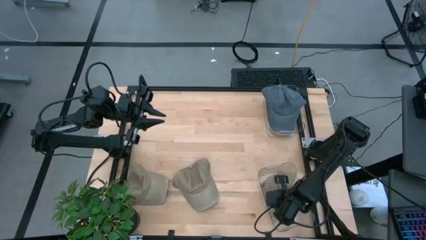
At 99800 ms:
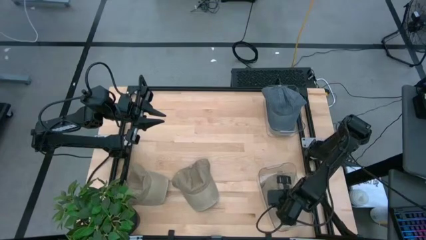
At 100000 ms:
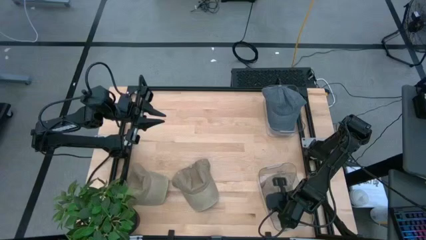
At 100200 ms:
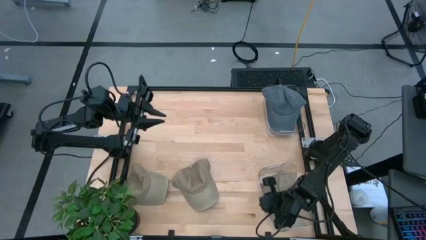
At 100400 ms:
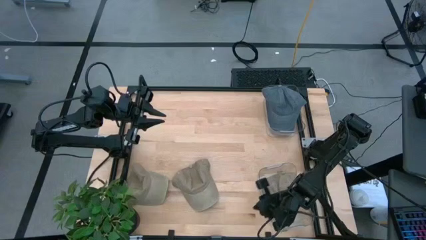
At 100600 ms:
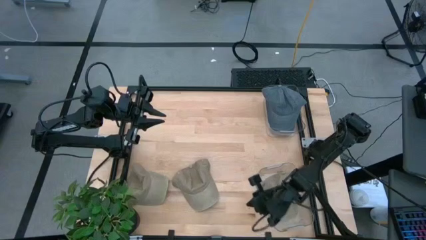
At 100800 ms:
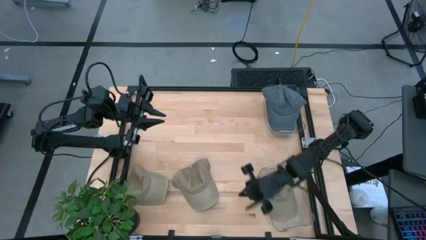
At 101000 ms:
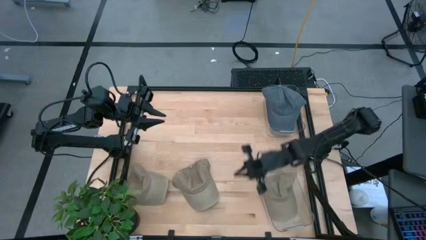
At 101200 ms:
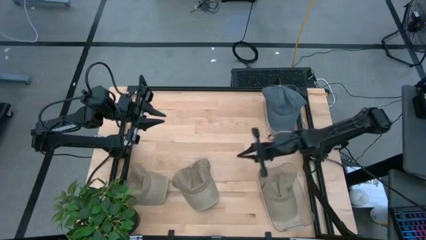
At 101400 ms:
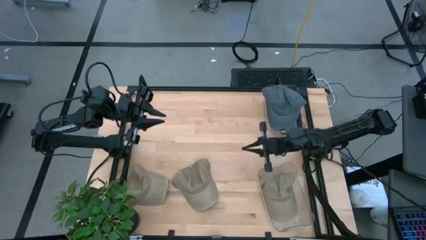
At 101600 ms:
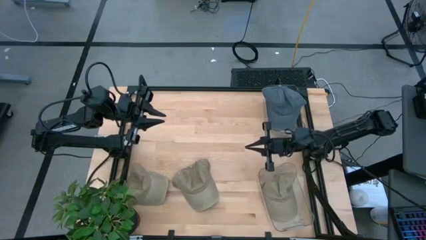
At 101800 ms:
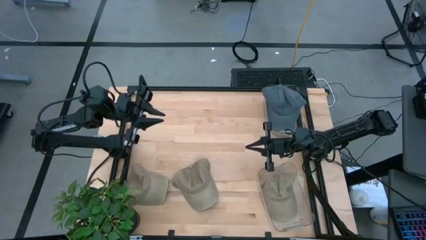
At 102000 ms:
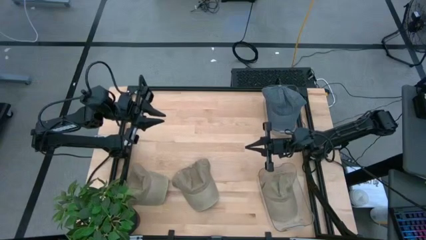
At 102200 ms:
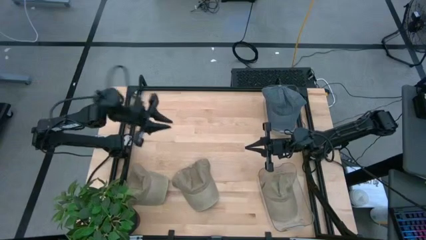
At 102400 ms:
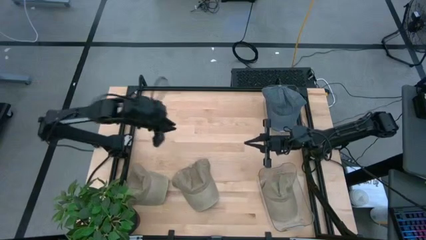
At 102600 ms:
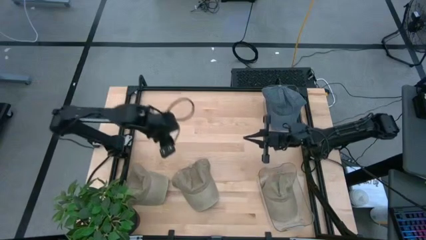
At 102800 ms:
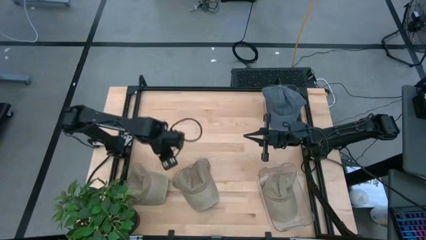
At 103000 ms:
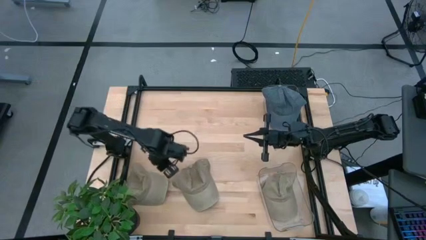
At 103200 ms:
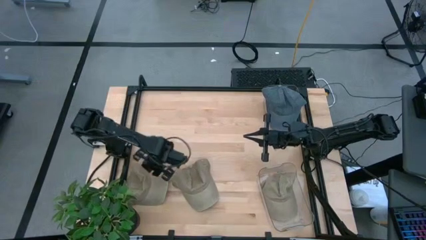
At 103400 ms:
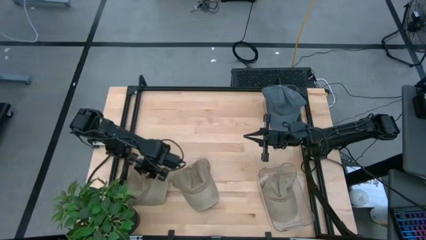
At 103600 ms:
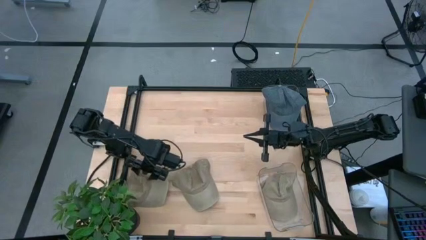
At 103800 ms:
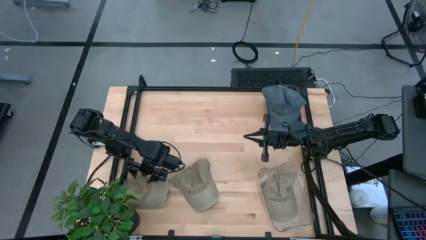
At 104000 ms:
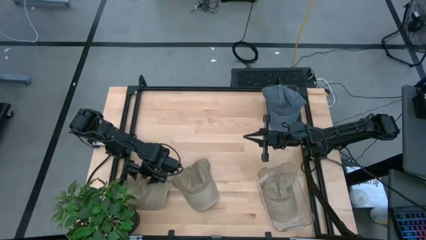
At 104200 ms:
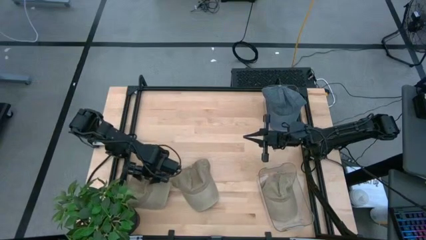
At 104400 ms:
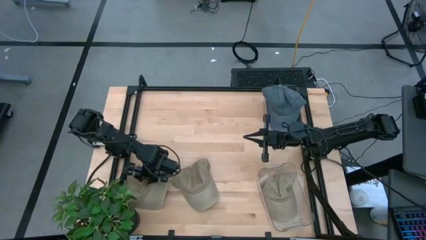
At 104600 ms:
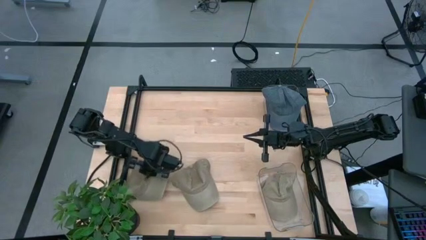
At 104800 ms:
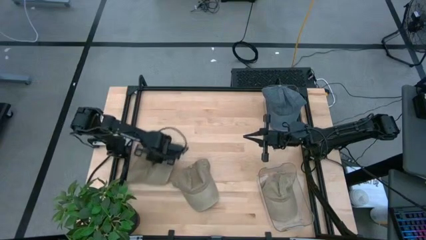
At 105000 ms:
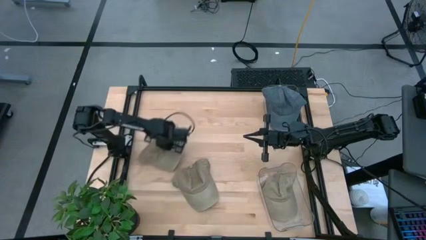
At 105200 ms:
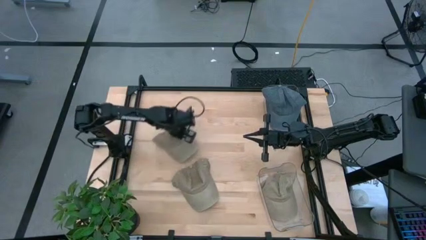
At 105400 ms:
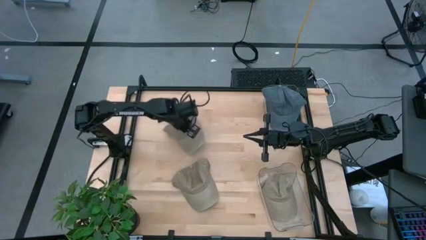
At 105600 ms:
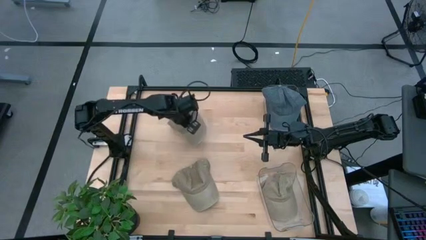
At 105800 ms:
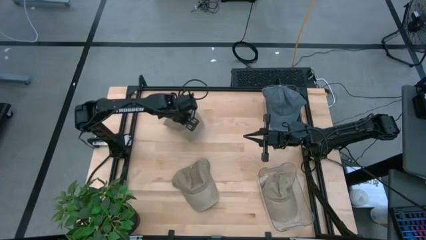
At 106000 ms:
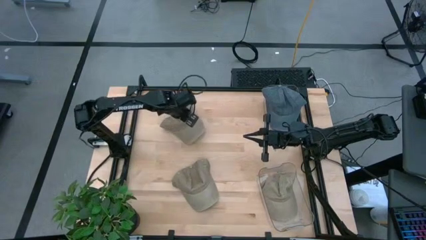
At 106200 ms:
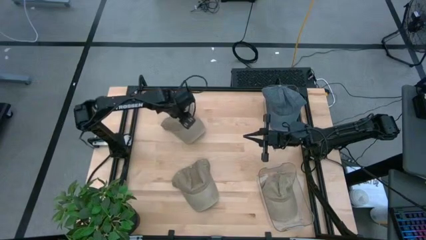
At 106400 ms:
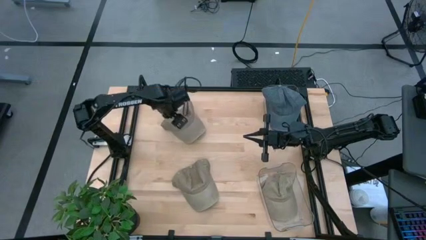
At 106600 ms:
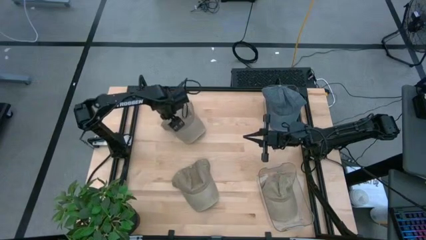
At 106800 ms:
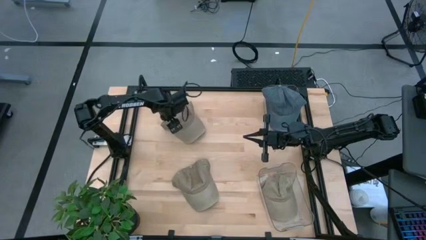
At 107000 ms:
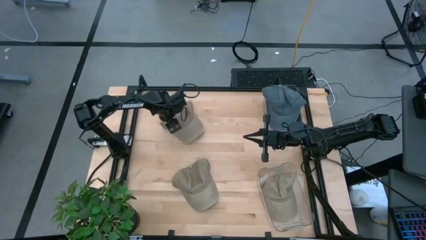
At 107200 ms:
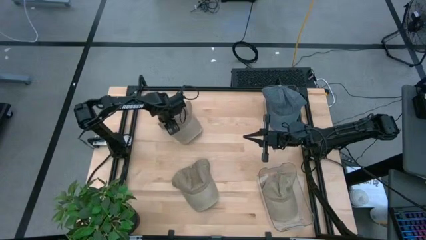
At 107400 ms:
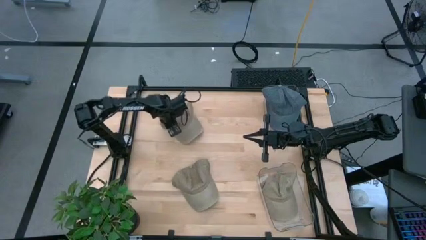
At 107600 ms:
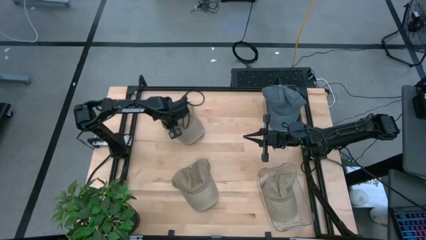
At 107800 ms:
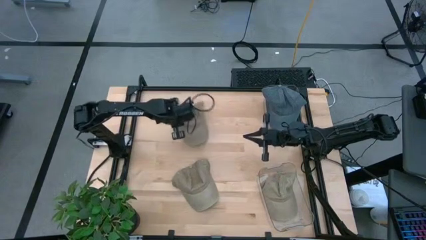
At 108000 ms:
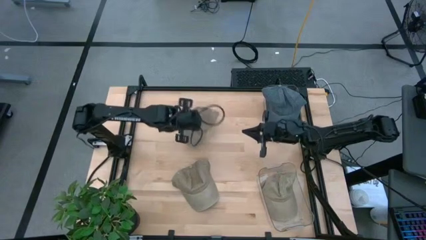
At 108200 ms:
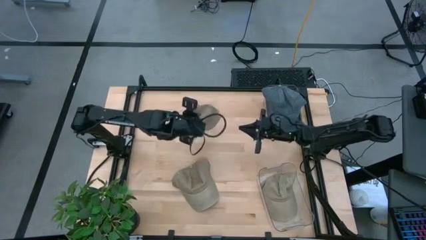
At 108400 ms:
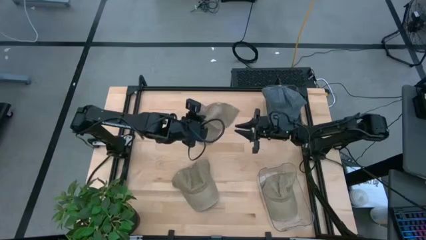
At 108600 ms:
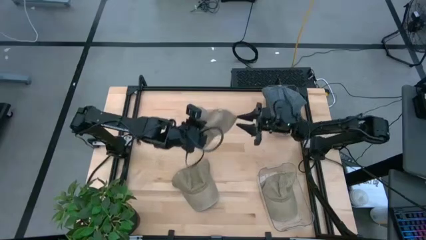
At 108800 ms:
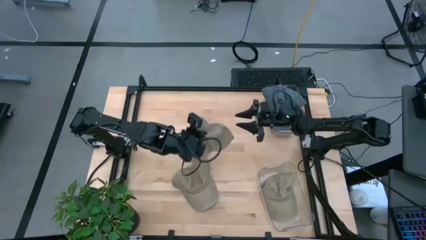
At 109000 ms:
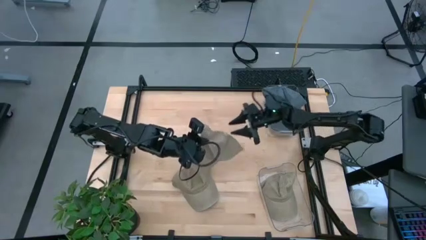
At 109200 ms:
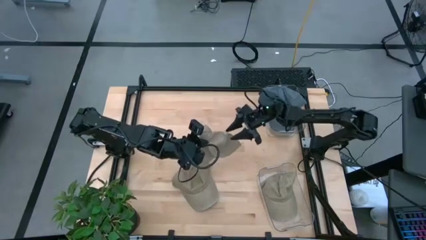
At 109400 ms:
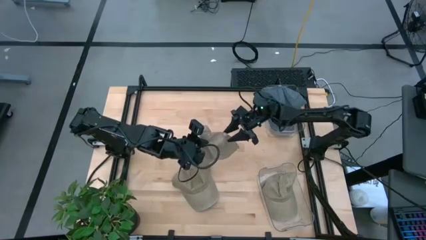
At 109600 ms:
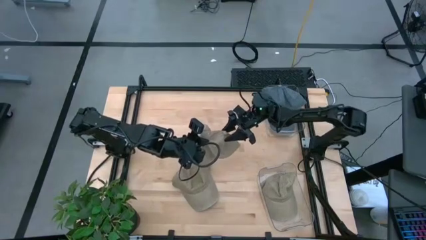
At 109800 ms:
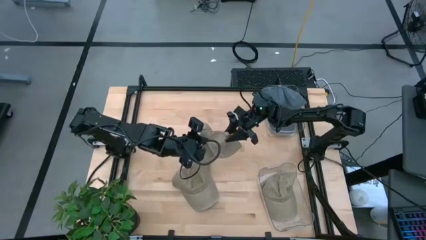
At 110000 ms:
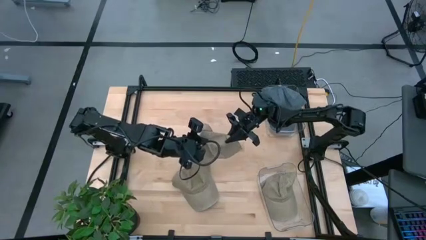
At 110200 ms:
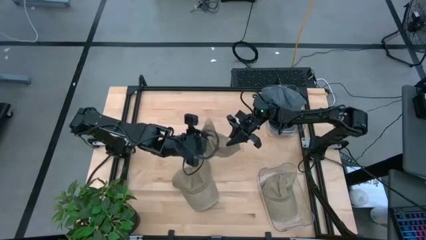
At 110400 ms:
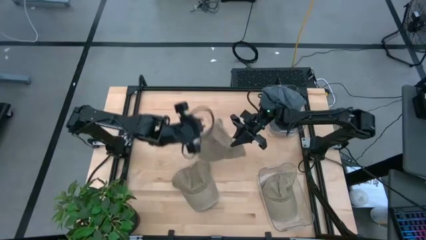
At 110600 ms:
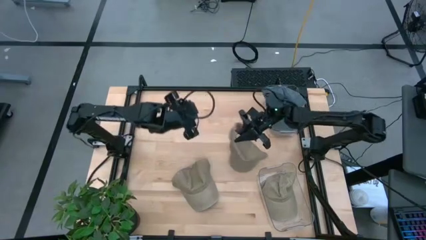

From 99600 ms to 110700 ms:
Task: Pick & Place hat
Put the left brown and blue cap into the bottom transparent bin

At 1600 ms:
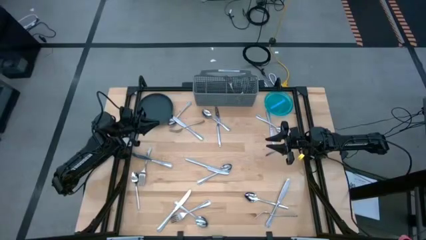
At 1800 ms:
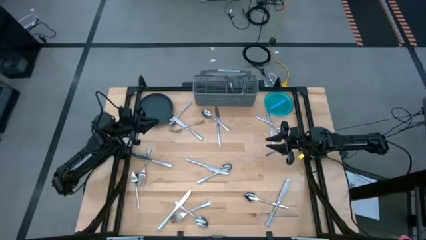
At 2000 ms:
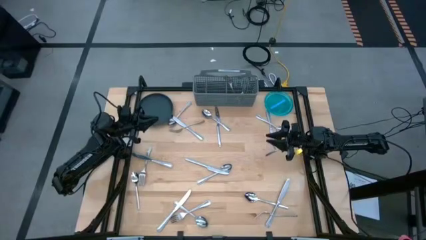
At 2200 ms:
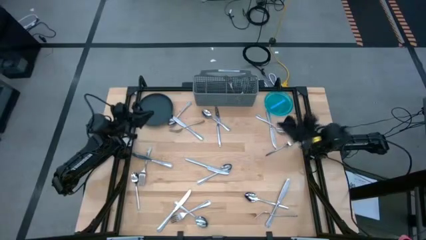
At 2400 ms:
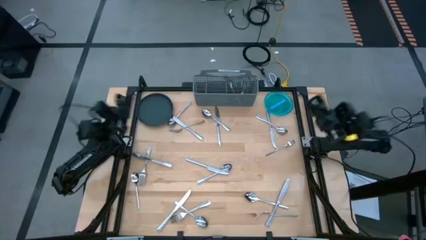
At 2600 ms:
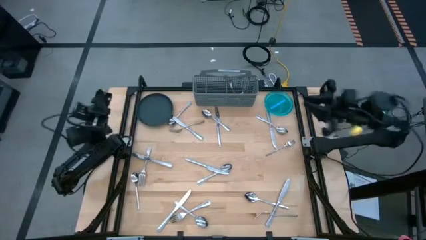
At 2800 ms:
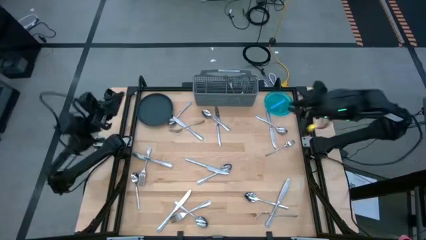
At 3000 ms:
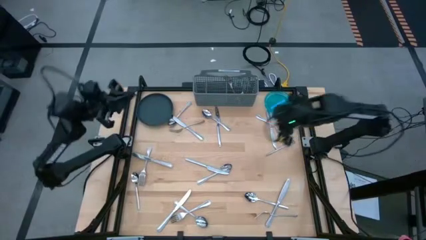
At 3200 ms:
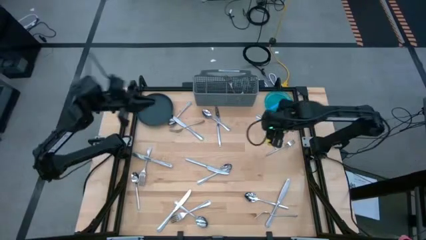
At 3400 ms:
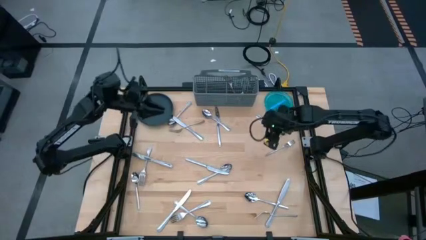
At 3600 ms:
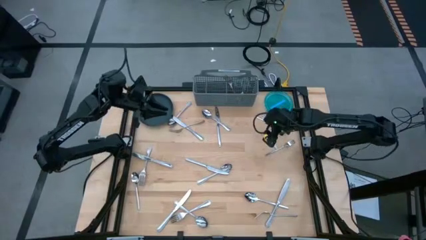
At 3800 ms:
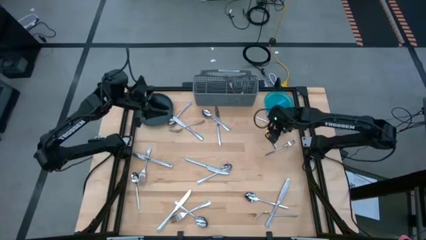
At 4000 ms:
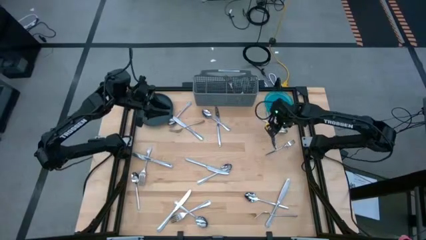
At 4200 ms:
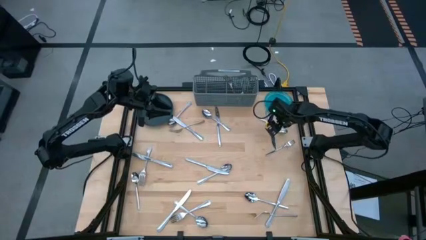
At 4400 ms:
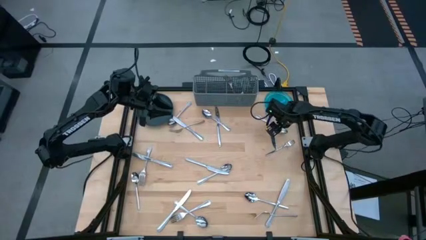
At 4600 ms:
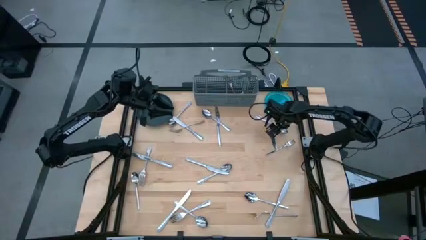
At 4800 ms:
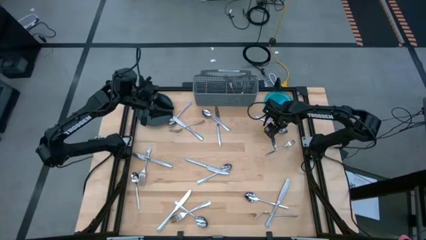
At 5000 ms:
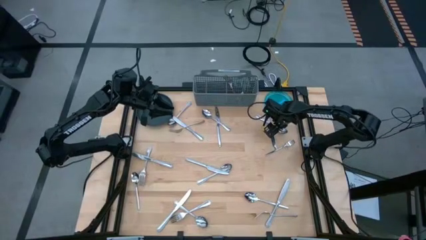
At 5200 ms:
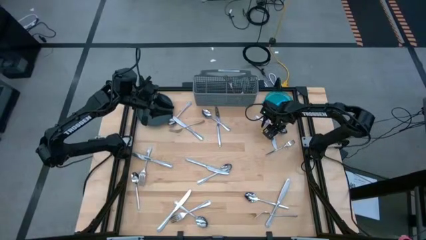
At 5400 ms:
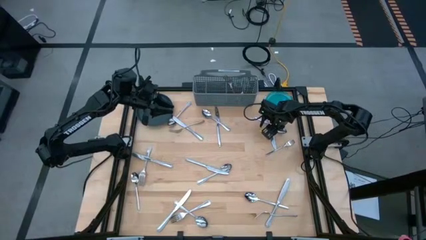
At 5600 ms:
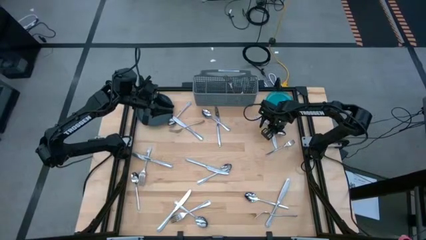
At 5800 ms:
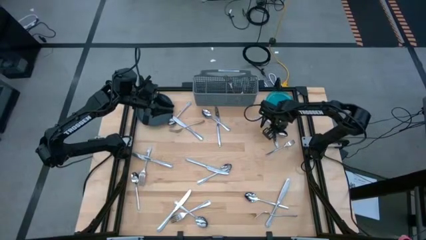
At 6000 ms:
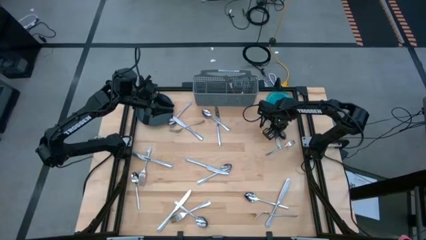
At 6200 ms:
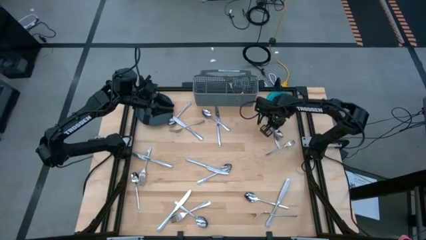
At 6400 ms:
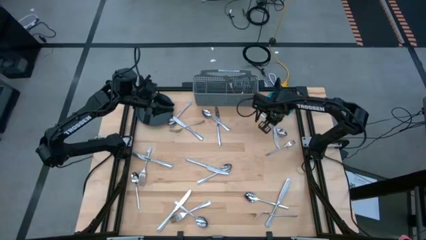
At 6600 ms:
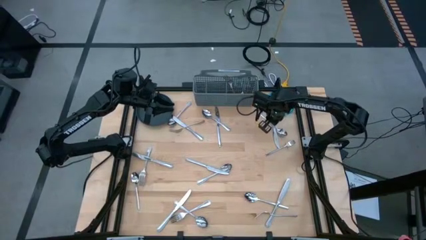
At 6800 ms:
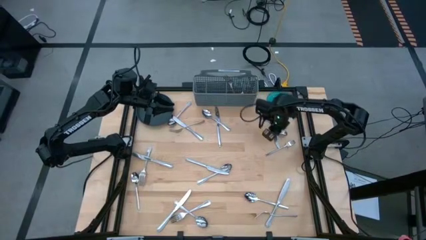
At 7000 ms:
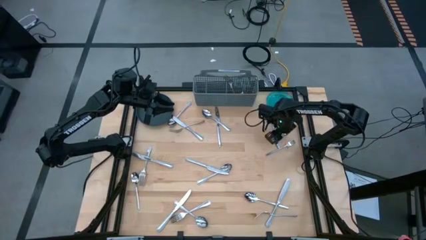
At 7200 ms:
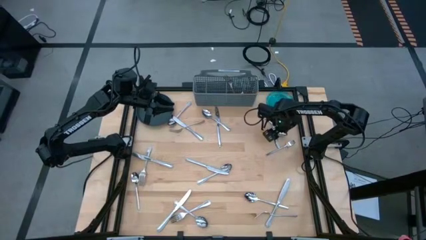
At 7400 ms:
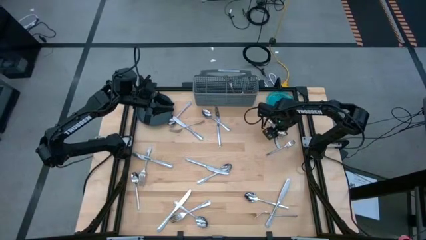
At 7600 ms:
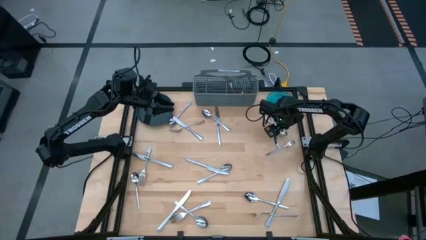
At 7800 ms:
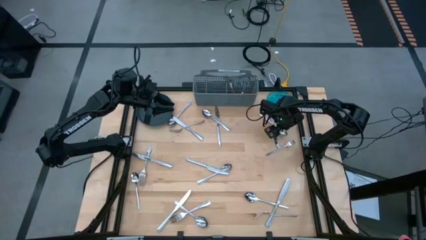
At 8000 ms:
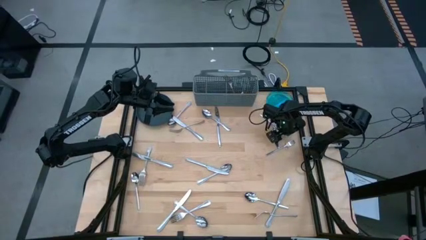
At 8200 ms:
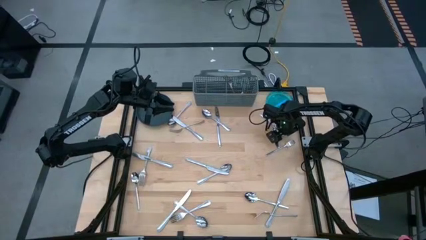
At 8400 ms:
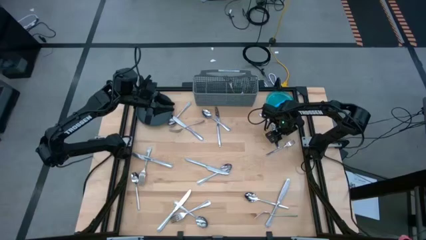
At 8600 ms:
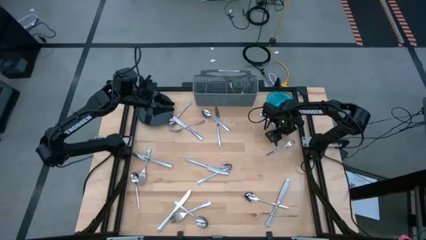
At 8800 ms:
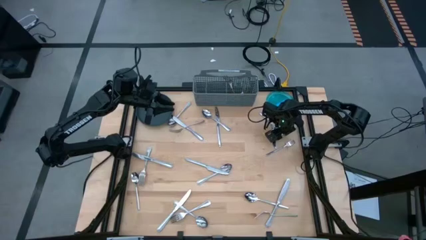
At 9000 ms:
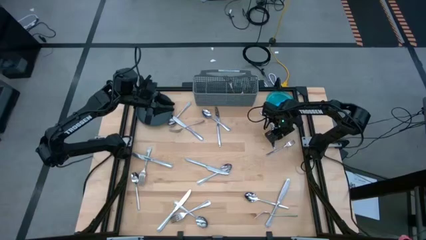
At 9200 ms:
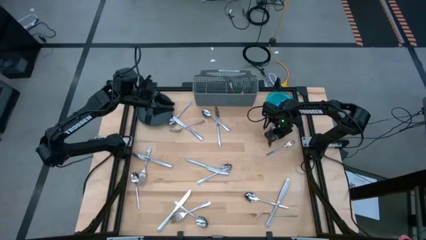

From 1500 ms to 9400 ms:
Task: Sort silverware
Put the spoon into the silverware basket
